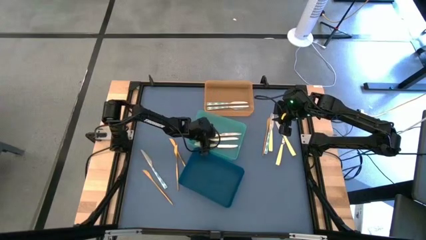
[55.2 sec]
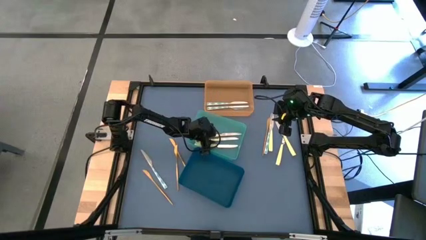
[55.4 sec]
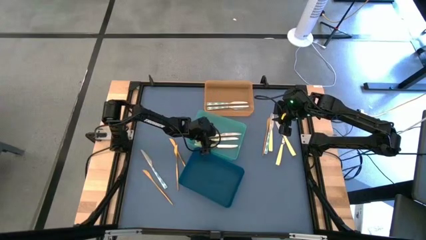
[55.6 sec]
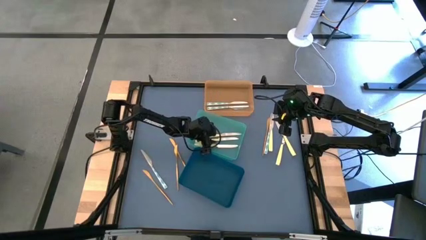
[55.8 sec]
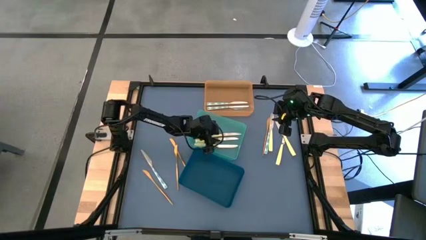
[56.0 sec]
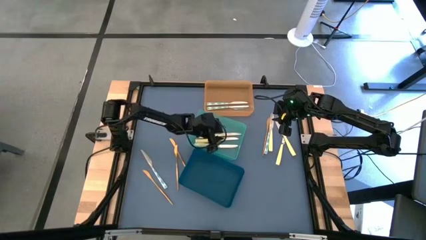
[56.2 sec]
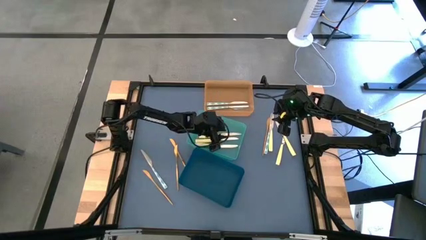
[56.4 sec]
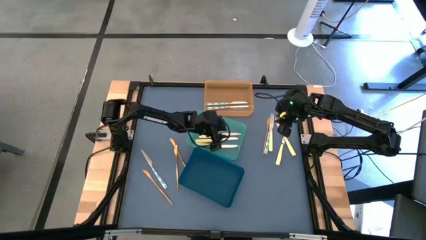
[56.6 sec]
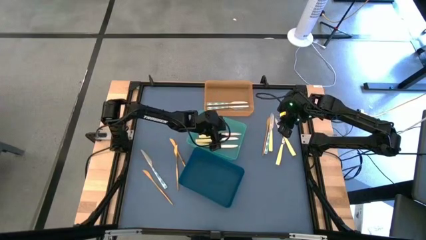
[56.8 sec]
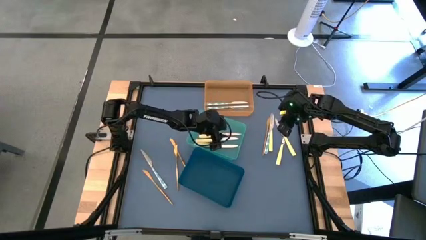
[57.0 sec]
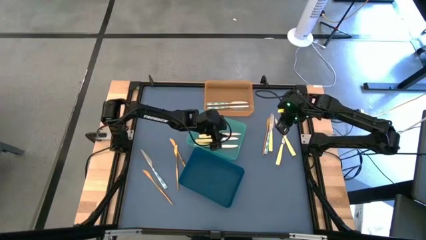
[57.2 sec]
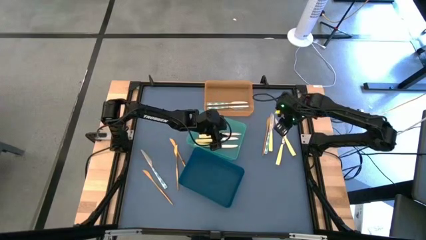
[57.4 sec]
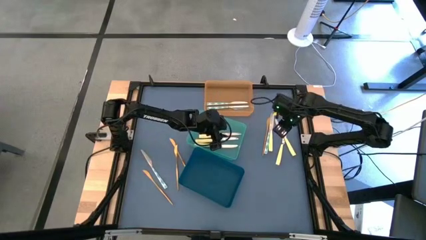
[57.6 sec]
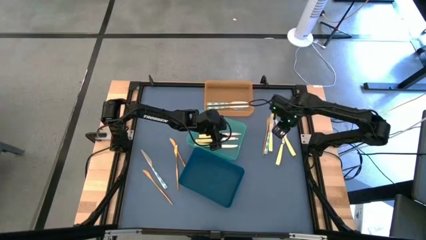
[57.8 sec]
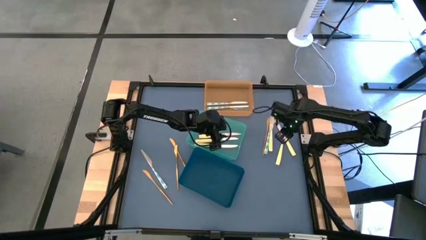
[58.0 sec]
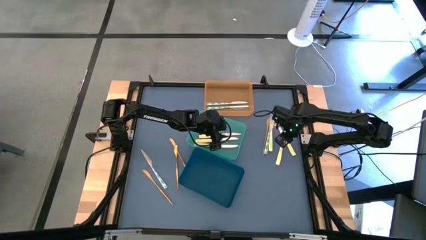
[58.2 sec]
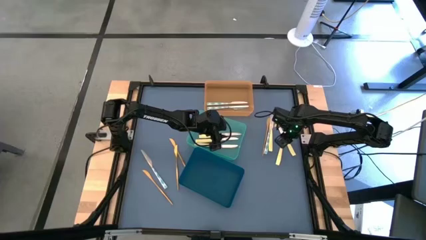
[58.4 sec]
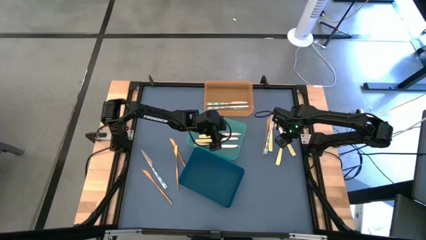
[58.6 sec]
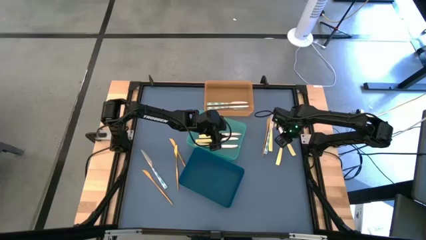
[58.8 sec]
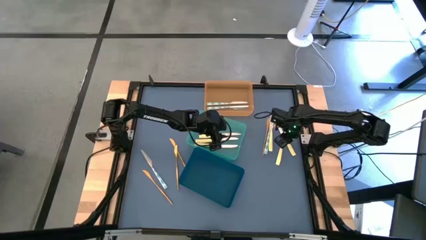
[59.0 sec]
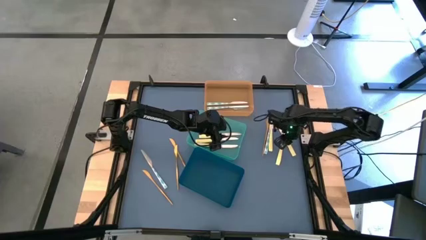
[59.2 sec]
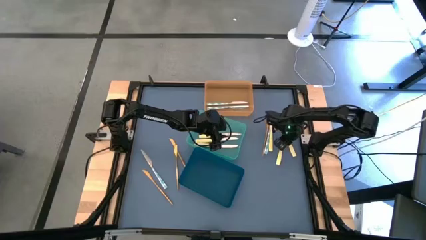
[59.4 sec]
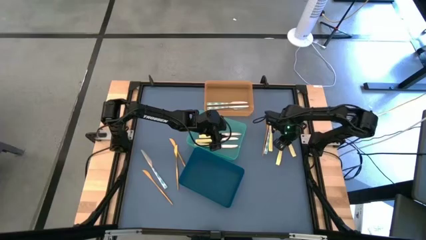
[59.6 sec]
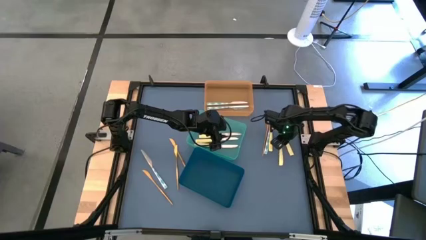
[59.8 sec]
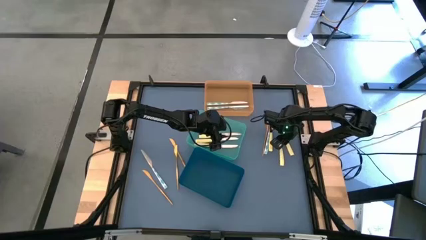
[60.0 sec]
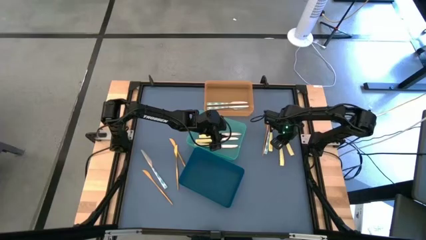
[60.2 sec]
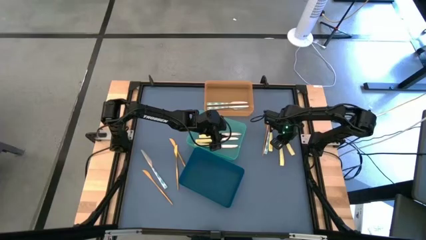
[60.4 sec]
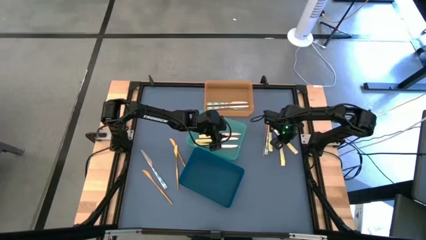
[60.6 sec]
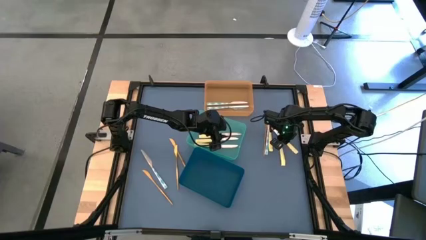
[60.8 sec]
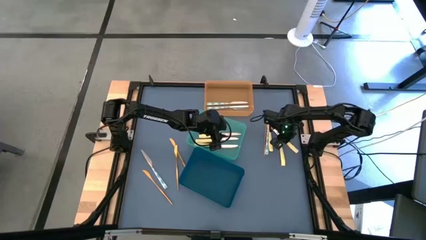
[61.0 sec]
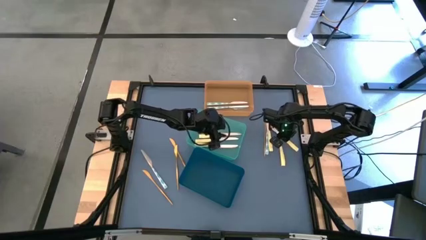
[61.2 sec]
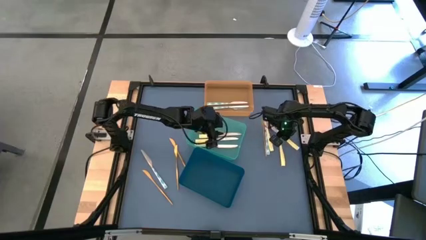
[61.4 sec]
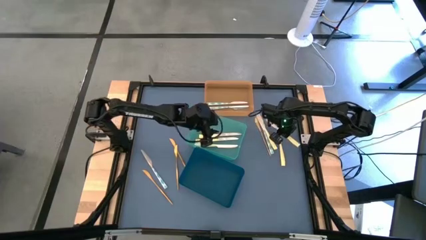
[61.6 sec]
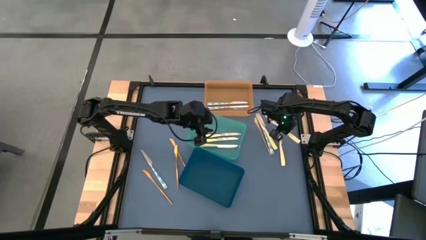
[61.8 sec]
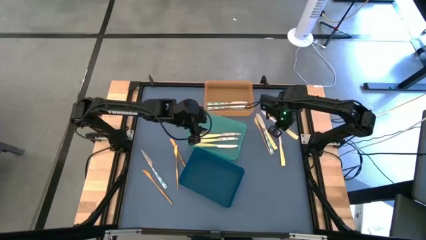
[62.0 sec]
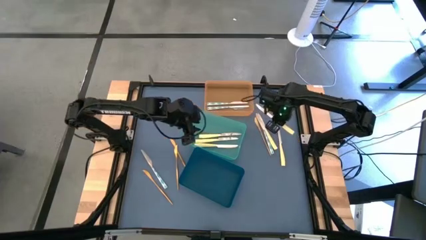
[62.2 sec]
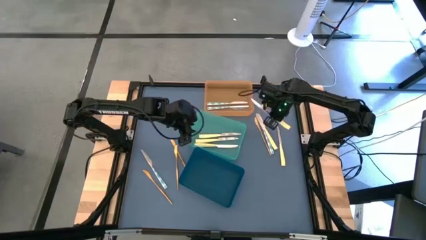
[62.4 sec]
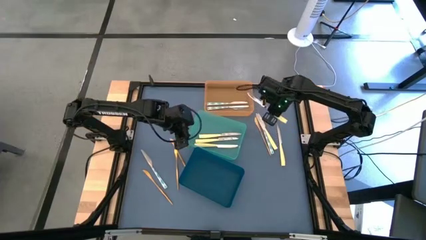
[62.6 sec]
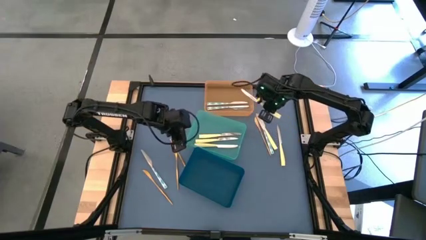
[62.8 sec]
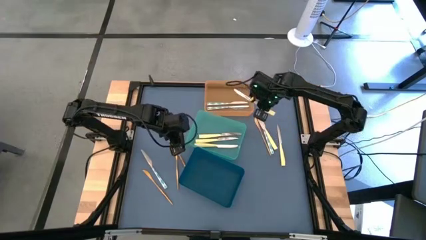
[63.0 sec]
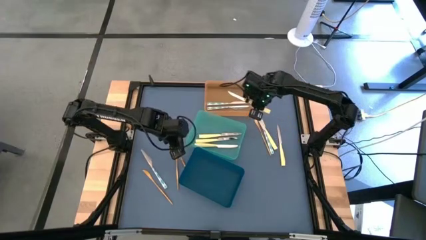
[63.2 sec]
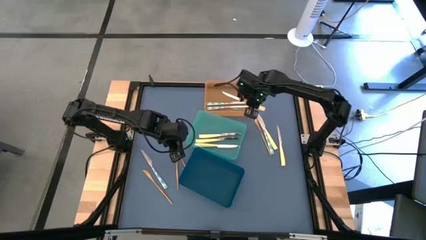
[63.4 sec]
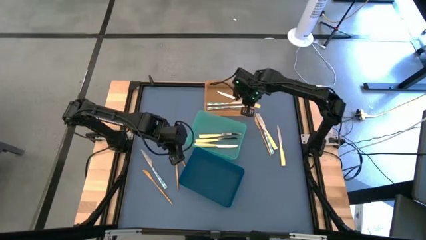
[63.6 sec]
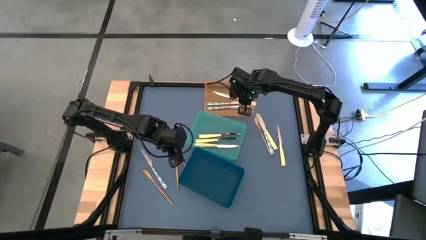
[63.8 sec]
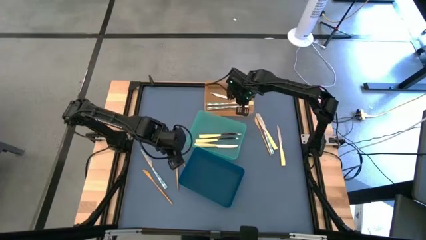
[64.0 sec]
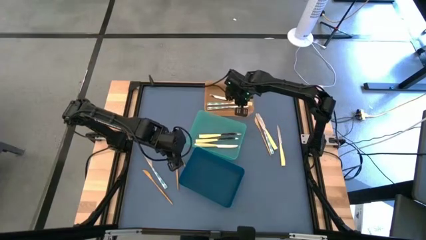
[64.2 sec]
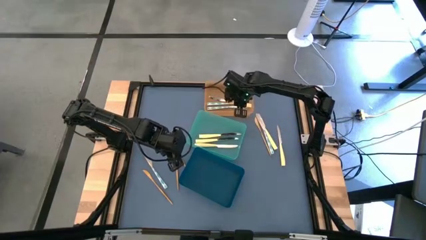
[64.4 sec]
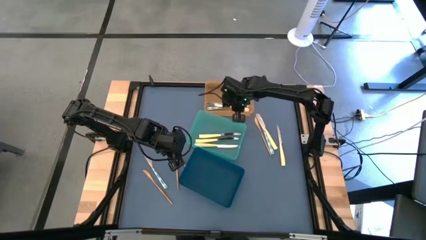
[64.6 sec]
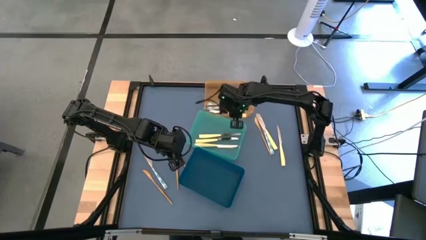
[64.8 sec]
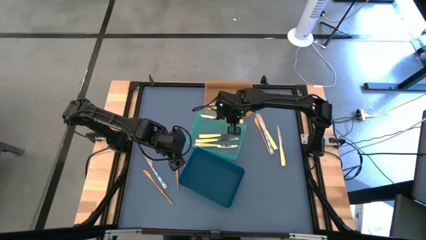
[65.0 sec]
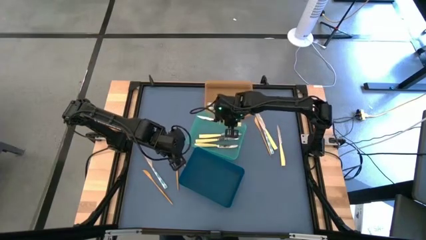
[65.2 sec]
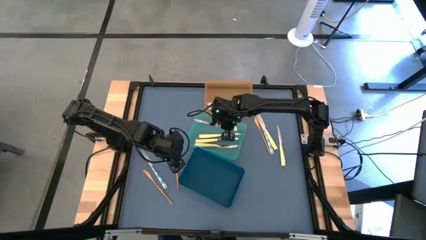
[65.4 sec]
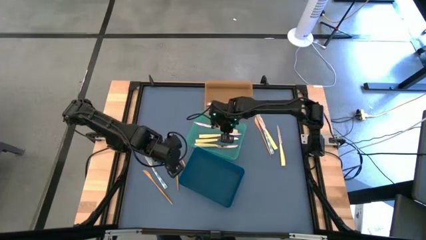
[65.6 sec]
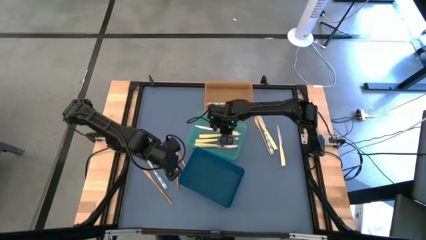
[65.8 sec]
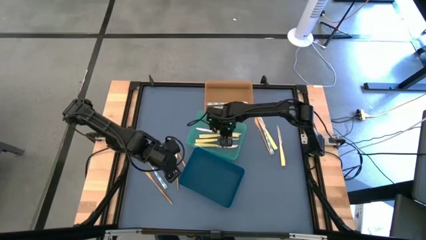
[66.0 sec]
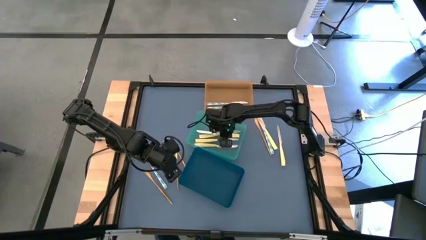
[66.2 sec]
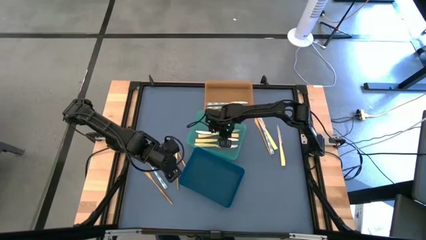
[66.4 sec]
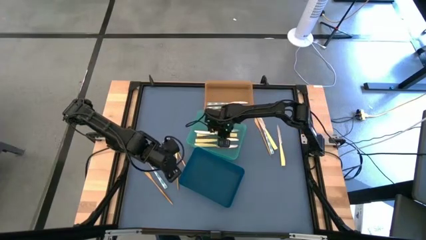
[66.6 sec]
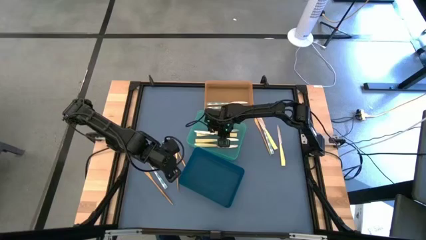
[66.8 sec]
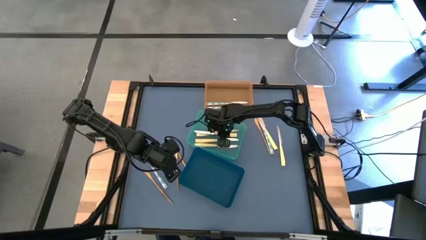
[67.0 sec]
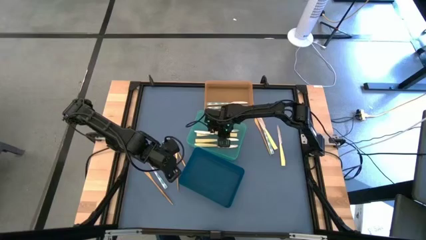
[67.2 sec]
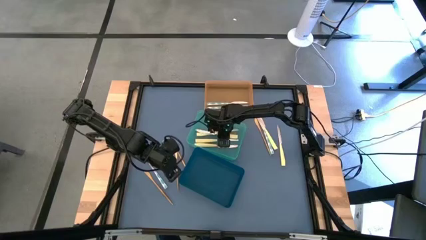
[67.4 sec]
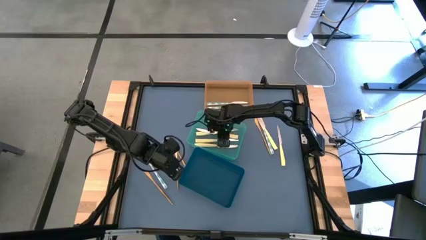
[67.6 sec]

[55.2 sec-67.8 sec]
Task: Sort silverware by color (type)
Put the yellow knife into the green bin
